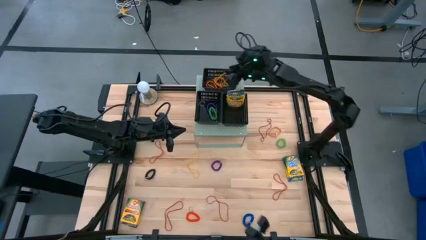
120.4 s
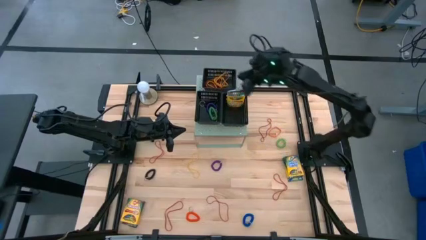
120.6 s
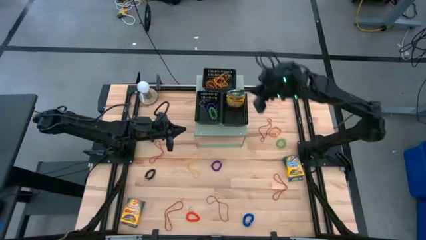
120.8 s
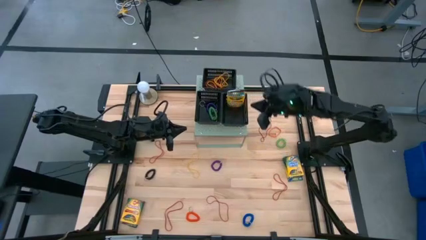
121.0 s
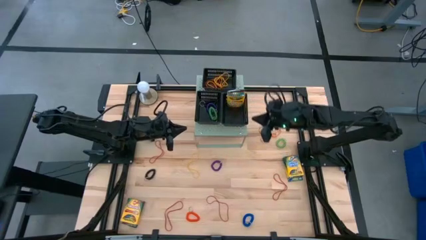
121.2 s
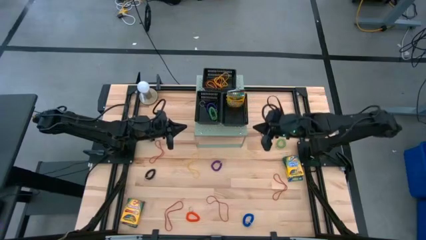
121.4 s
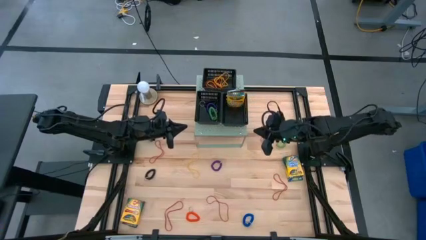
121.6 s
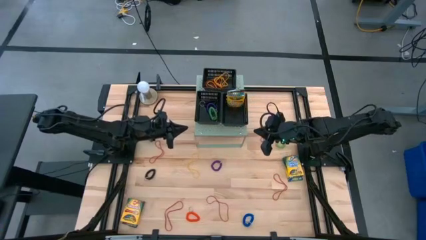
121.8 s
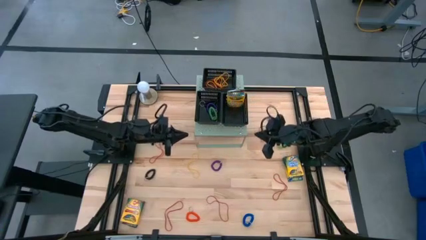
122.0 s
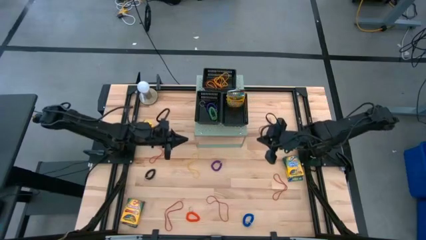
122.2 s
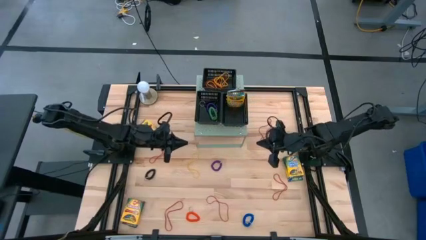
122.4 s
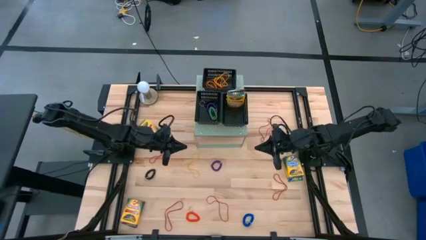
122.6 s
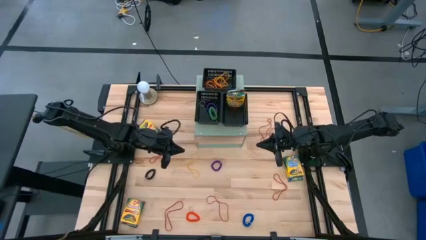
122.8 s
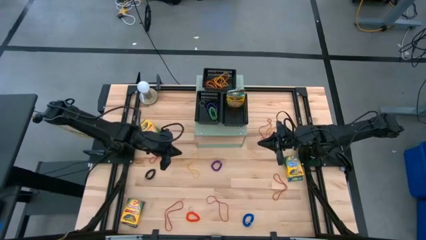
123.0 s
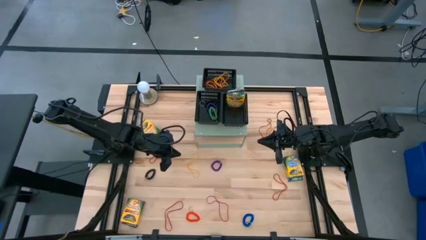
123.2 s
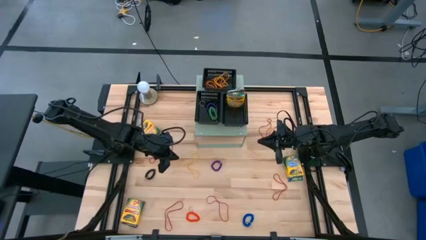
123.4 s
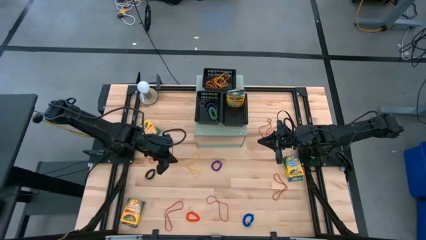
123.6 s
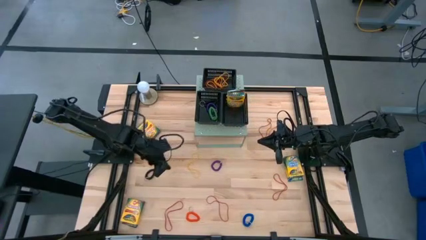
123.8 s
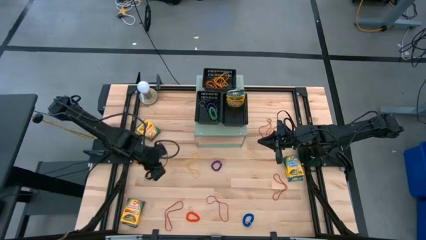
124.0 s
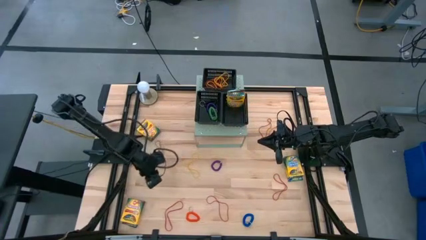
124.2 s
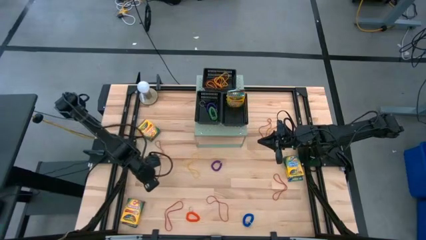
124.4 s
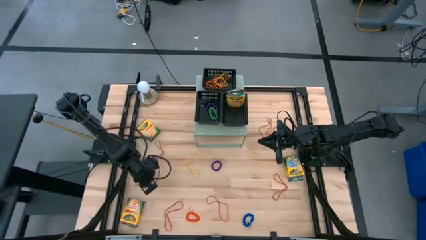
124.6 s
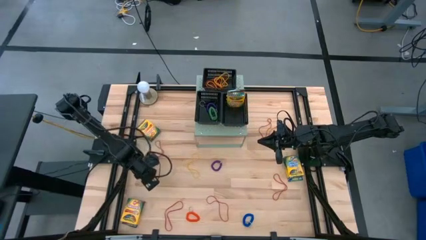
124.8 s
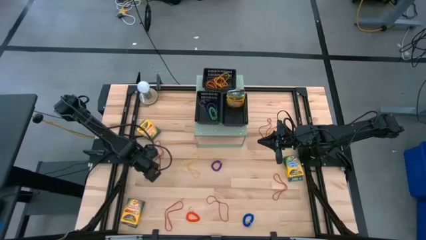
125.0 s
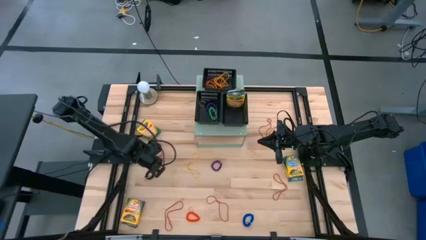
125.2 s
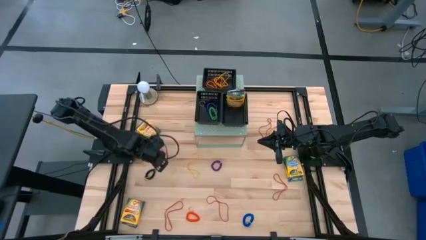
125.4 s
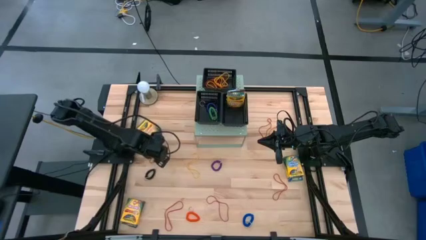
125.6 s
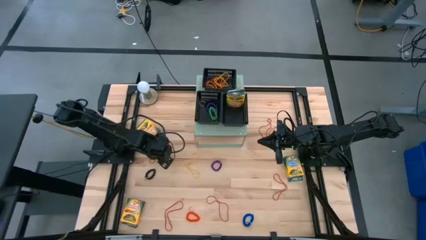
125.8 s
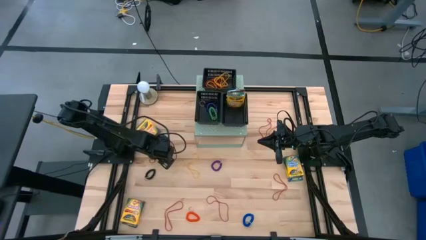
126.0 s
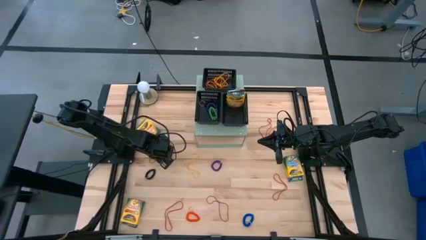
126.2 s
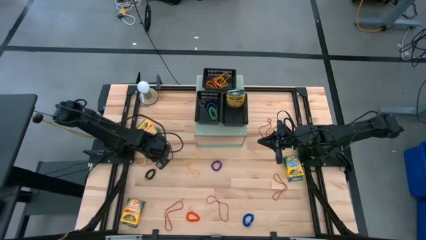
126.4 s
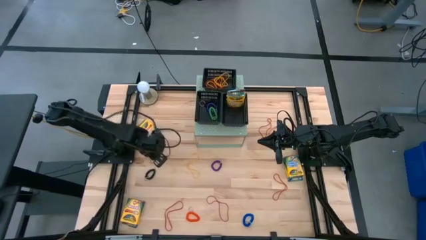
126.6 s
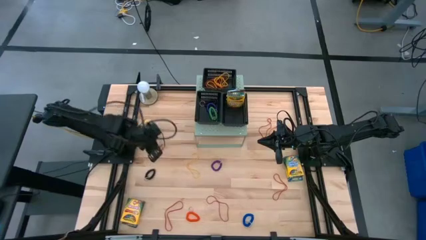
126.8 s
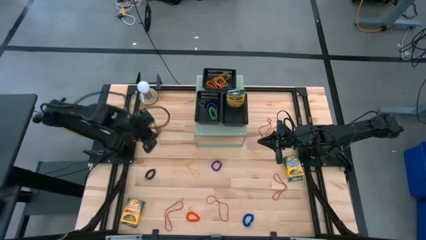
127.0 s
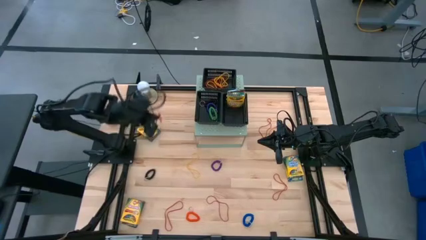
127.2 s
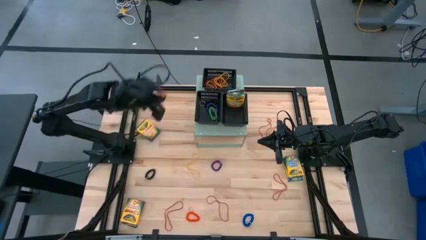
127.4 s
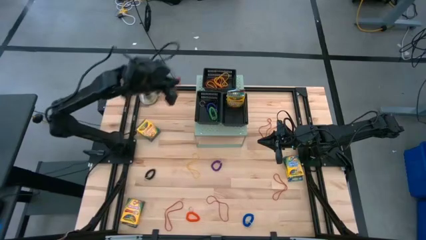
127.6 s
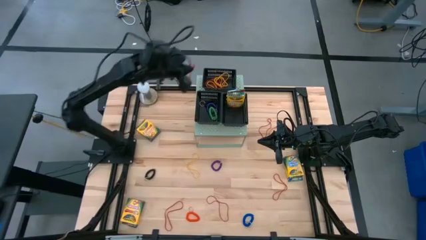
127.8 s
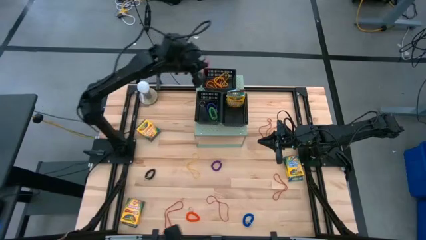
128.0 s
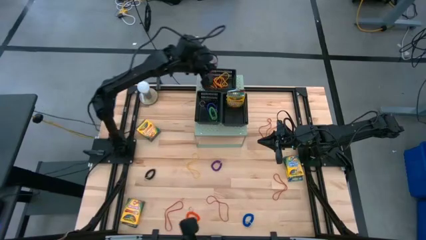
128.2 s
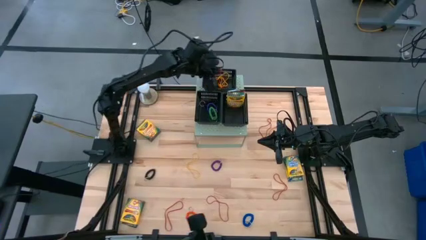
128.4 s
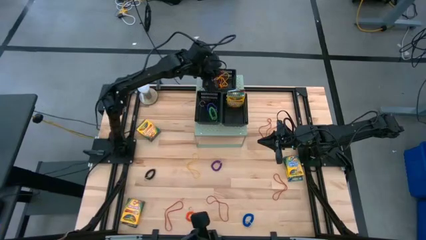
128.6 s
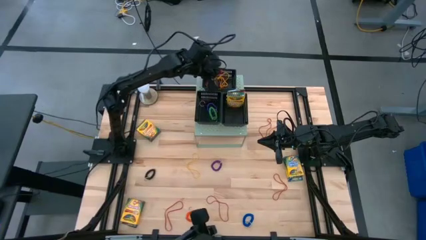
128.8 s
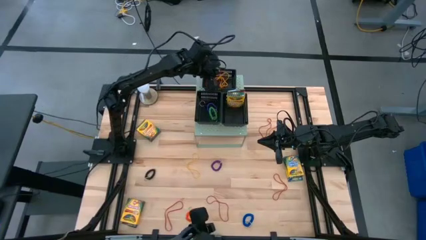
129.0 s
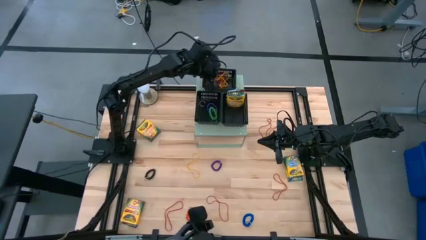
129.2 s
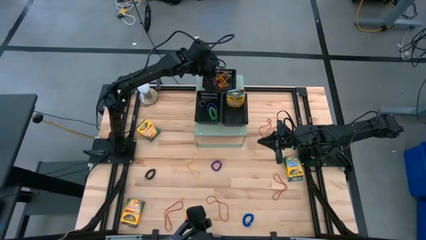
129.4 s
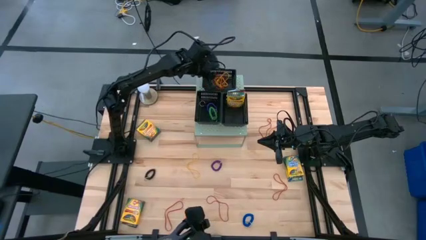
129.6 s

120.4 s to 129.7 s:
Task: Pick & Place Office Desk Supplies
Put the red rubber band into the top black bin

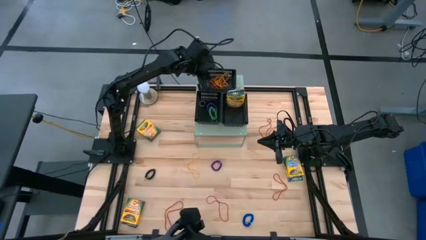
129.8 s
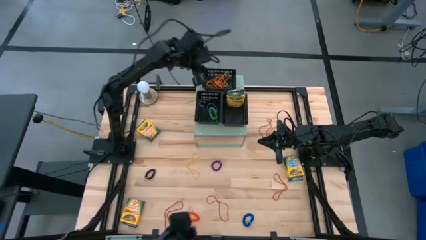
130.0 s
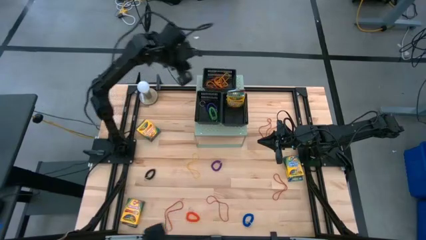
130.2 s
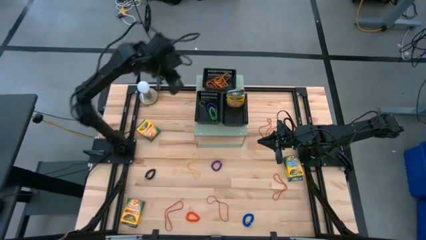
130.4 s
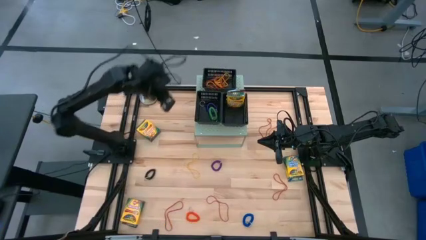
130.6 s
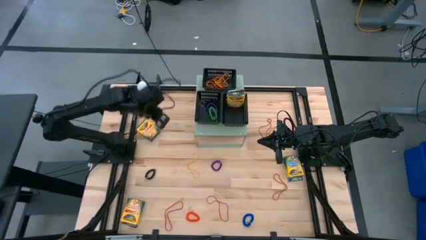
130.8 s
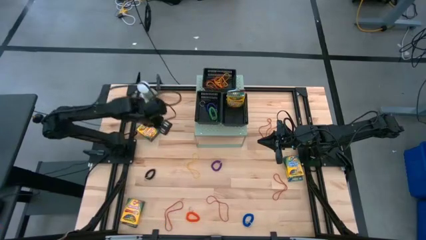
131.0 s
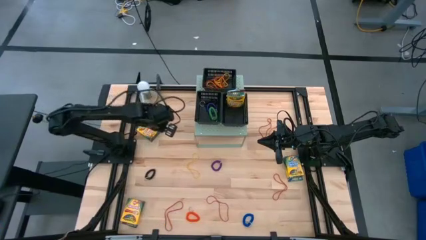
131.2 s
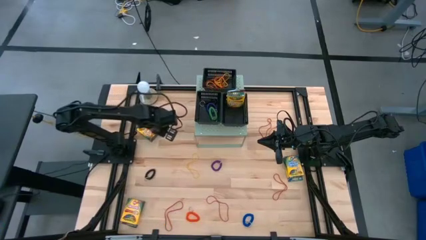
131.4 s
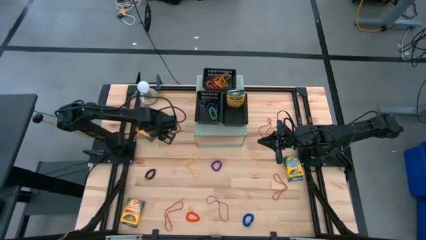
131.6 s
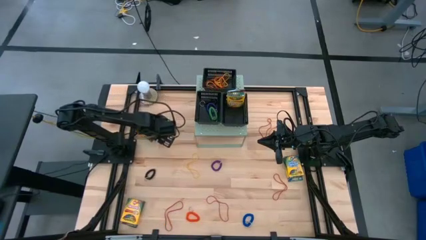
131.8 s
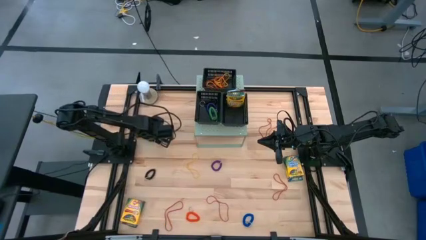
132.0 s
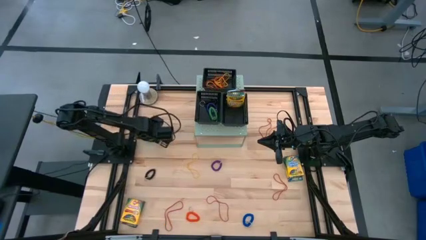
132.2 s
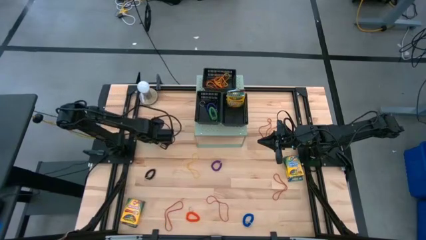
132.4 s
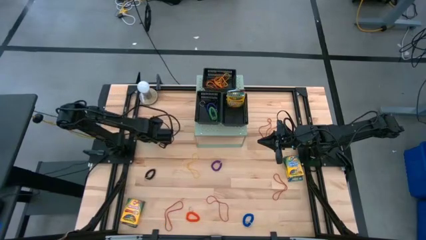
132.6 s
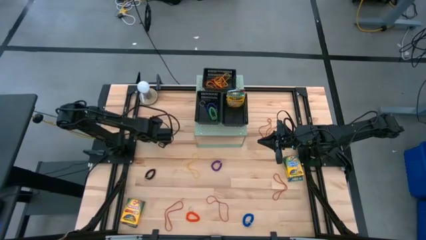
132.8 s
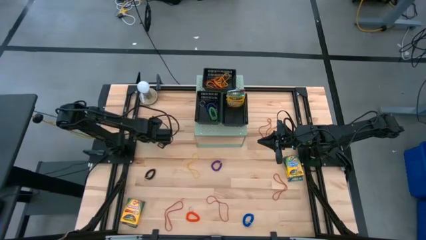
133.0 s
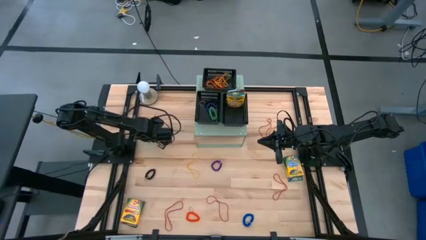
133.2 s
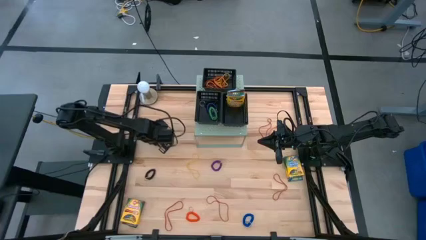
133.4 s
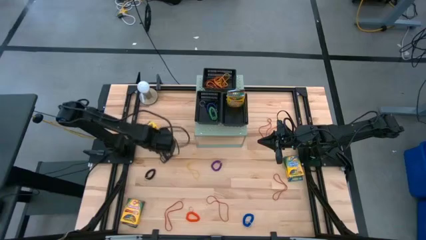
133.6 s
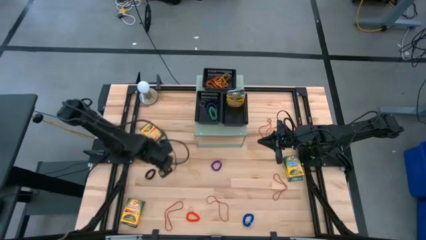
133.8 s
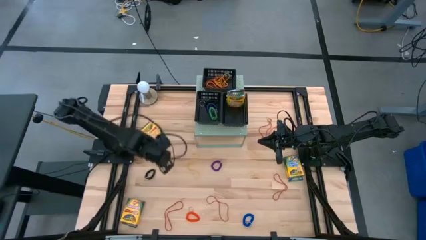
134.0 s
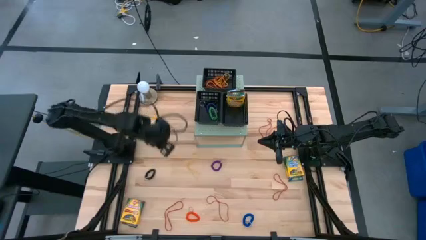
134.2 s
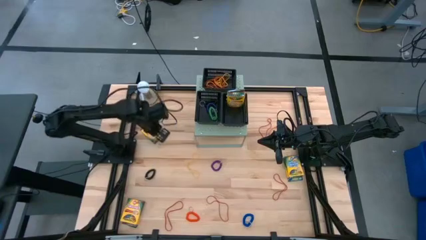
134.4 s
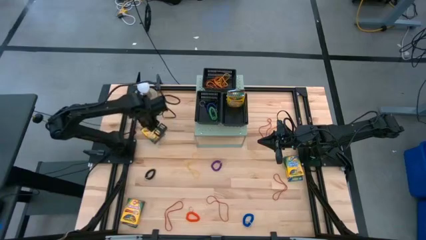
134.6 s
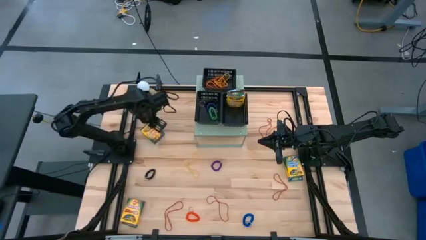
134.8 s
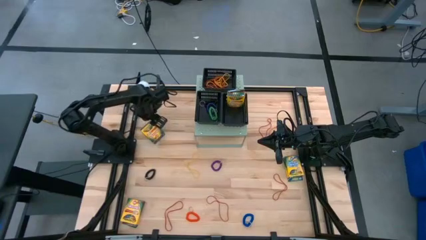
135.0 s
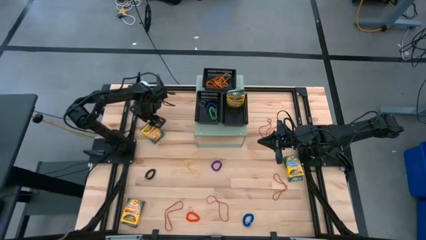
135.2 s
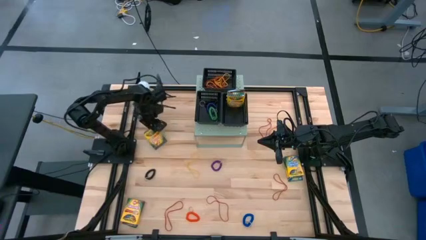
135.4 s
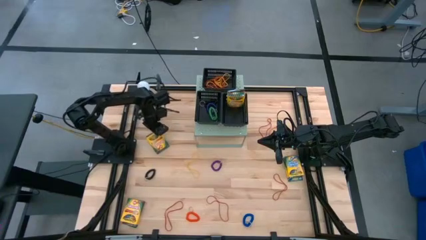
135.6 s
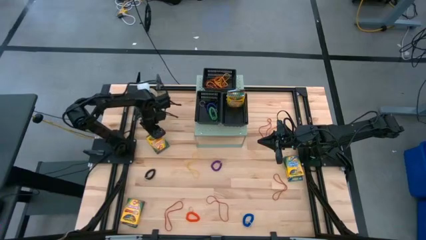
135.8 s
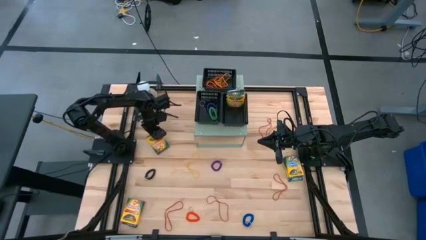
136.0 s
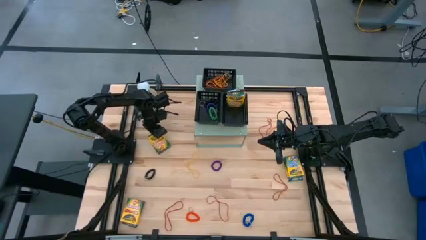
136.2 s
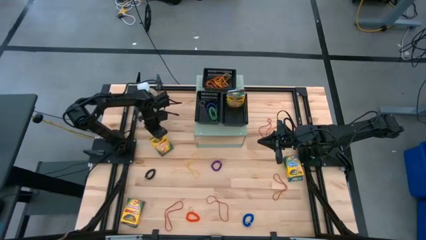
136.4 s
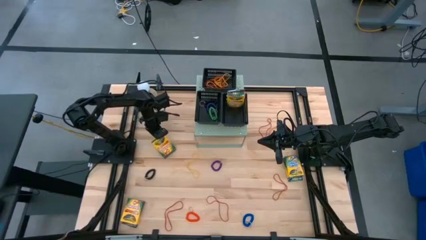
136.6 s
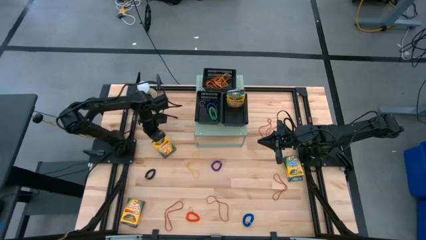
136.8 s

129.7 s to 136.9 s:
Put the yellow crayon box into the bottom right black bin
